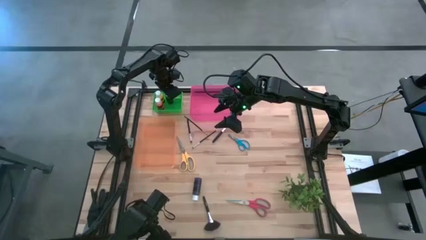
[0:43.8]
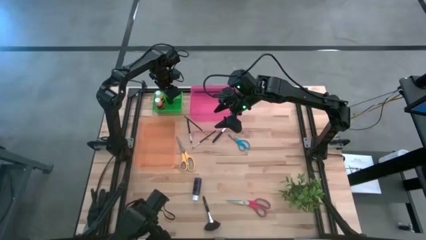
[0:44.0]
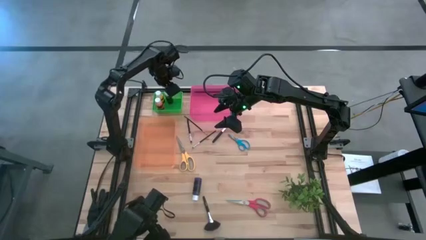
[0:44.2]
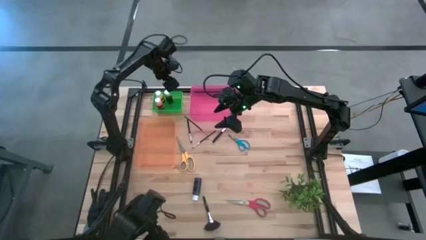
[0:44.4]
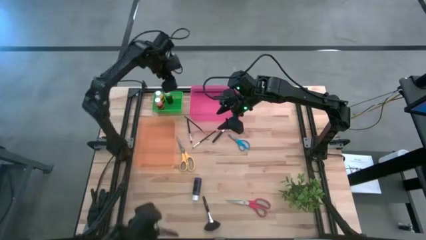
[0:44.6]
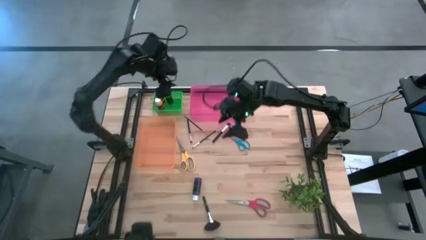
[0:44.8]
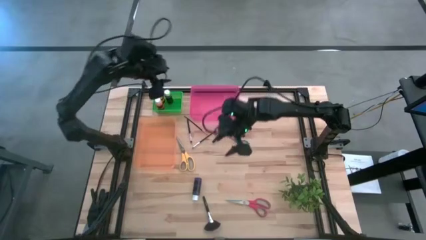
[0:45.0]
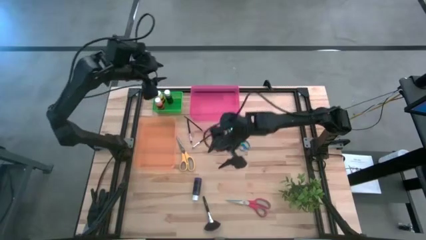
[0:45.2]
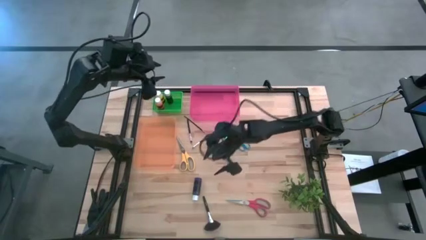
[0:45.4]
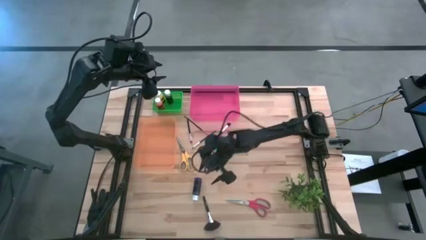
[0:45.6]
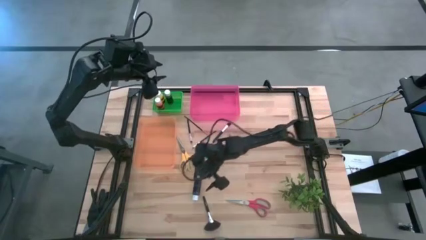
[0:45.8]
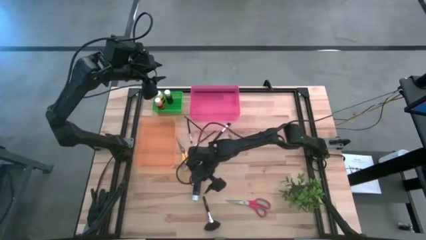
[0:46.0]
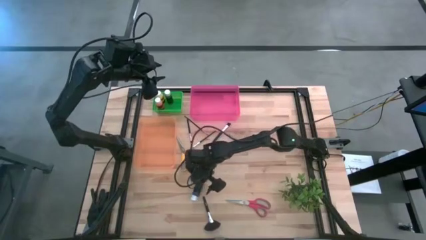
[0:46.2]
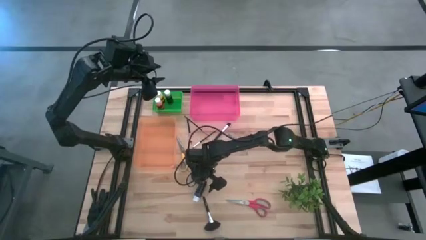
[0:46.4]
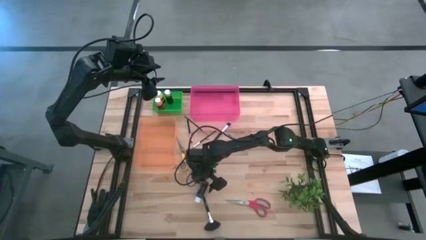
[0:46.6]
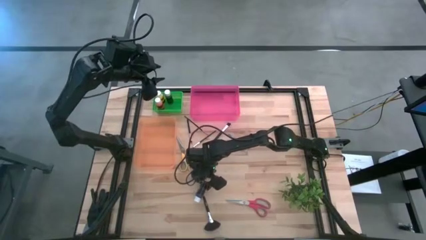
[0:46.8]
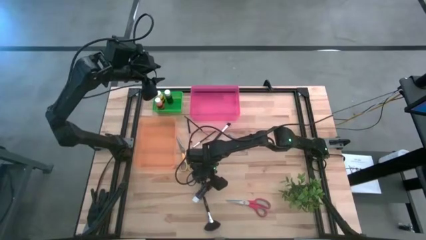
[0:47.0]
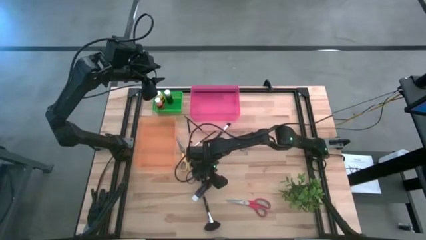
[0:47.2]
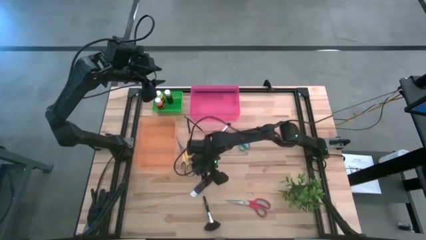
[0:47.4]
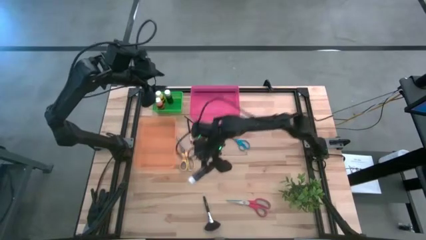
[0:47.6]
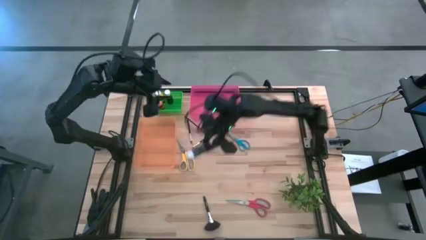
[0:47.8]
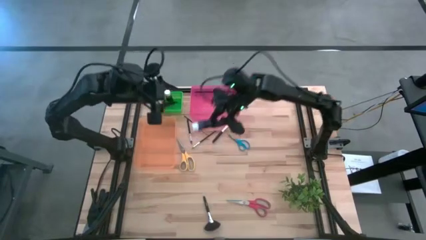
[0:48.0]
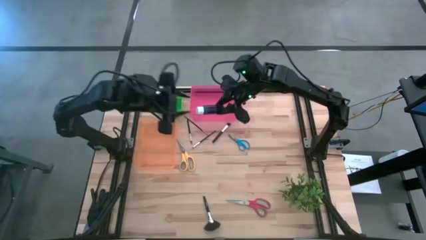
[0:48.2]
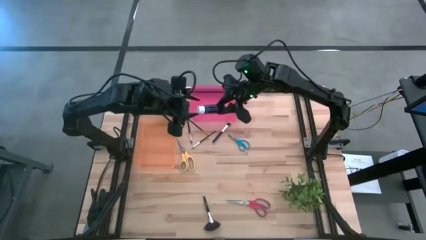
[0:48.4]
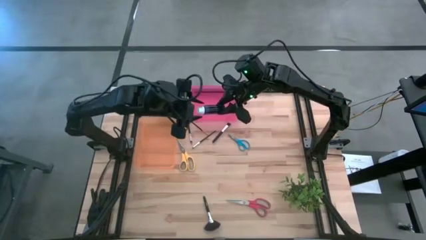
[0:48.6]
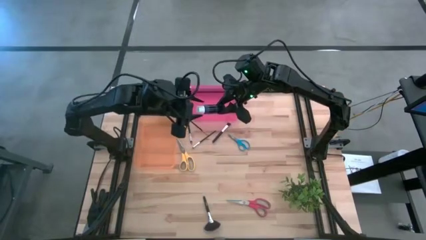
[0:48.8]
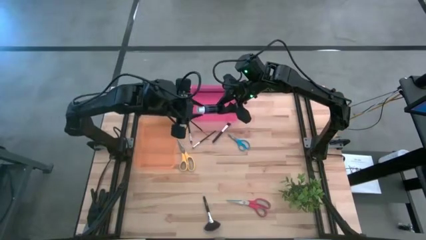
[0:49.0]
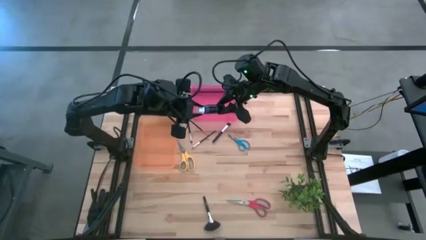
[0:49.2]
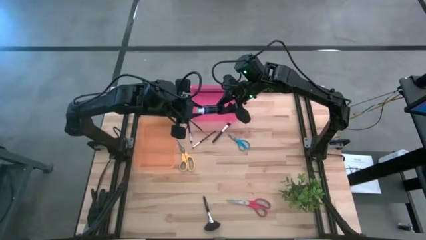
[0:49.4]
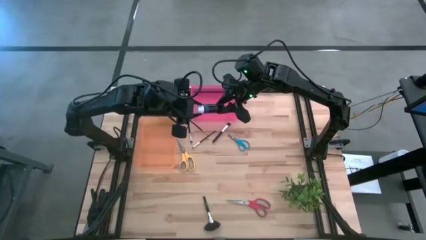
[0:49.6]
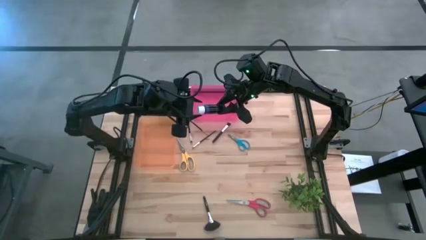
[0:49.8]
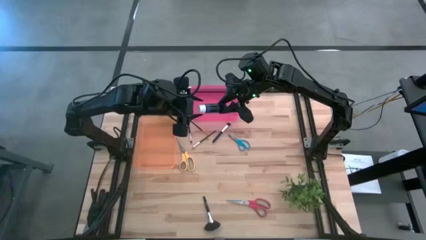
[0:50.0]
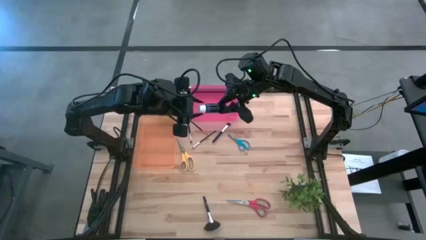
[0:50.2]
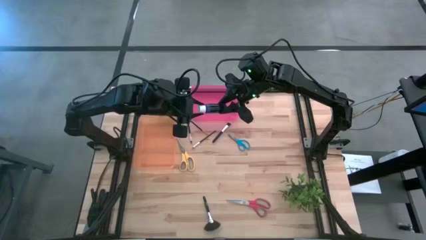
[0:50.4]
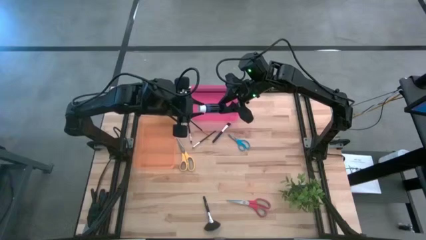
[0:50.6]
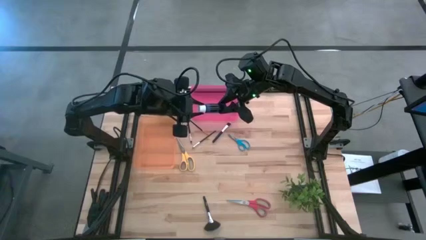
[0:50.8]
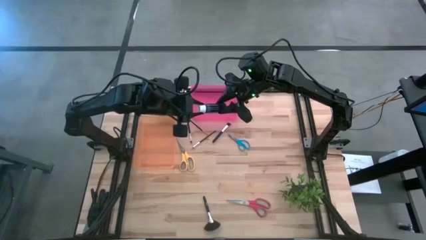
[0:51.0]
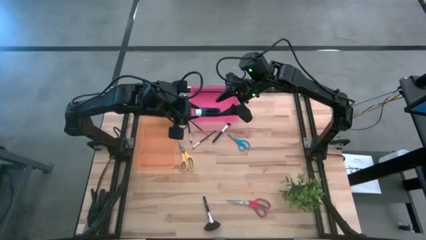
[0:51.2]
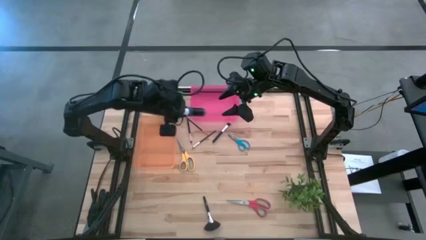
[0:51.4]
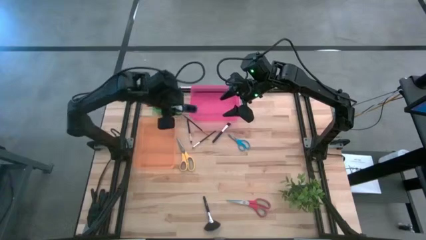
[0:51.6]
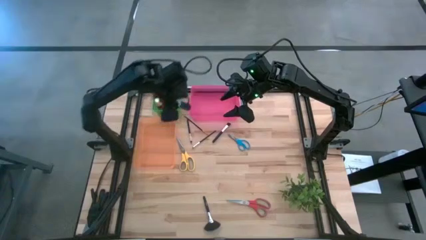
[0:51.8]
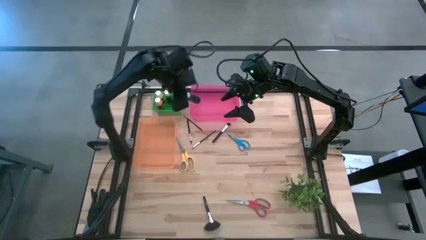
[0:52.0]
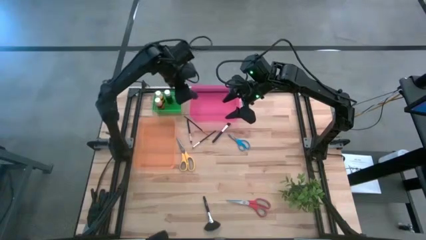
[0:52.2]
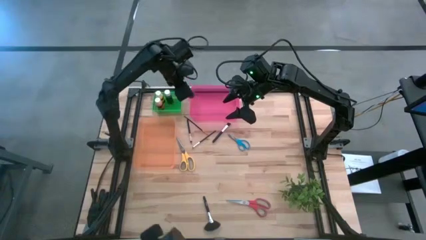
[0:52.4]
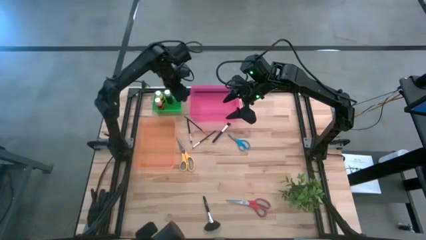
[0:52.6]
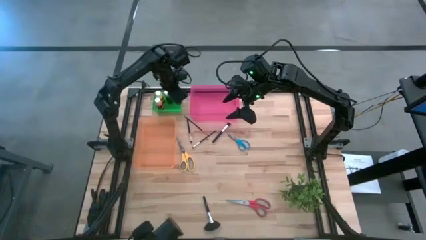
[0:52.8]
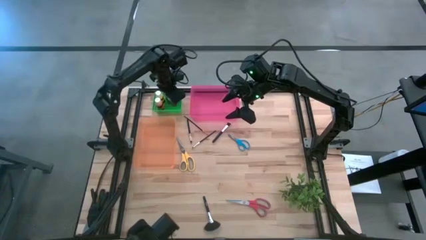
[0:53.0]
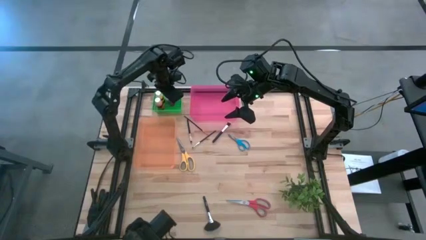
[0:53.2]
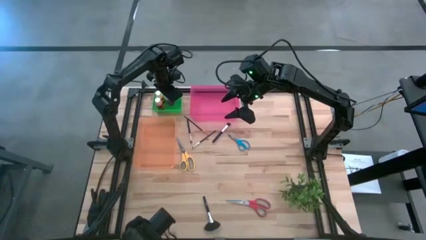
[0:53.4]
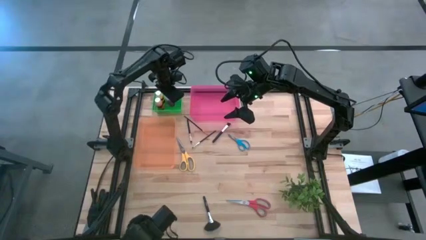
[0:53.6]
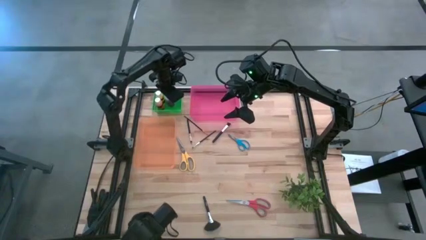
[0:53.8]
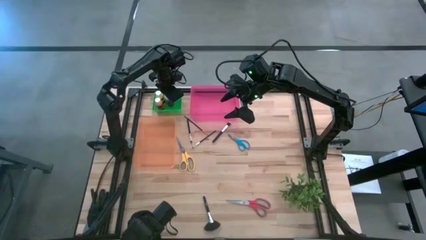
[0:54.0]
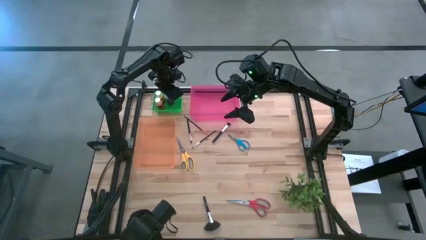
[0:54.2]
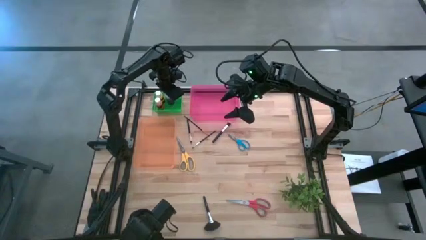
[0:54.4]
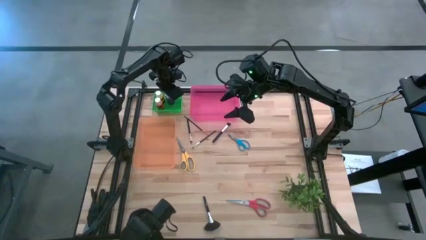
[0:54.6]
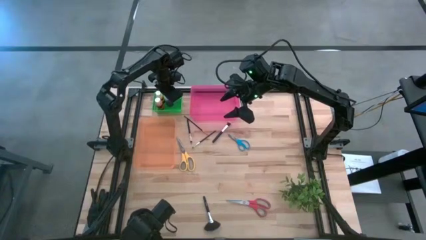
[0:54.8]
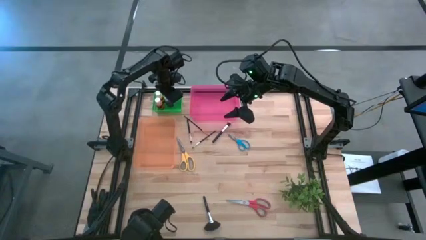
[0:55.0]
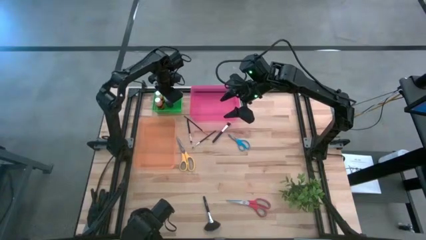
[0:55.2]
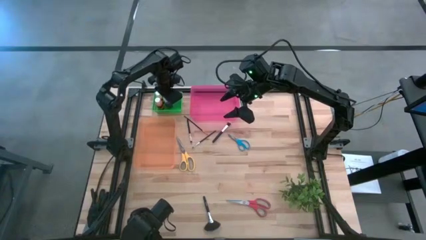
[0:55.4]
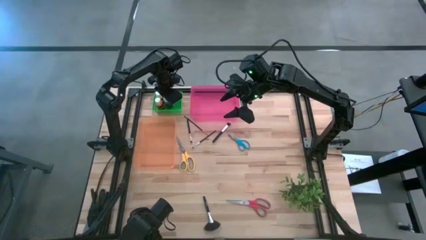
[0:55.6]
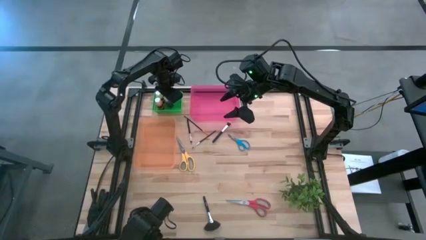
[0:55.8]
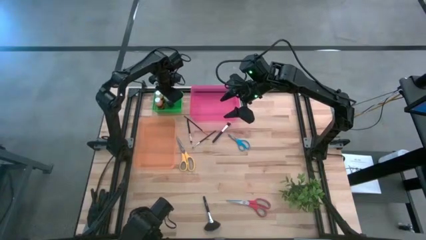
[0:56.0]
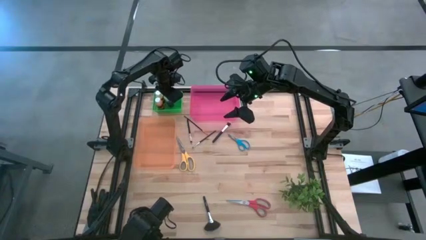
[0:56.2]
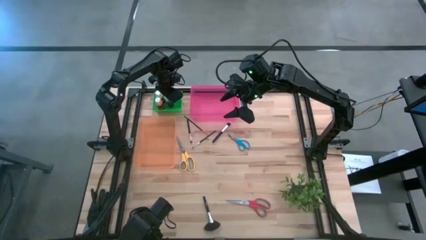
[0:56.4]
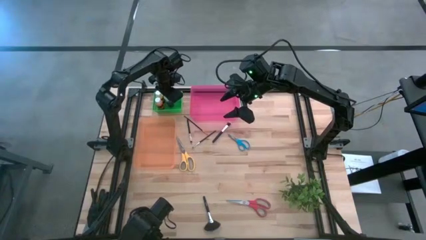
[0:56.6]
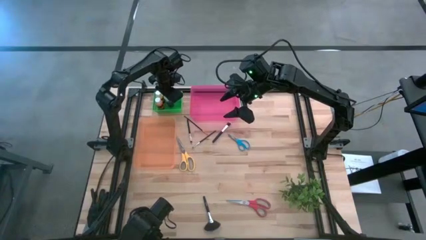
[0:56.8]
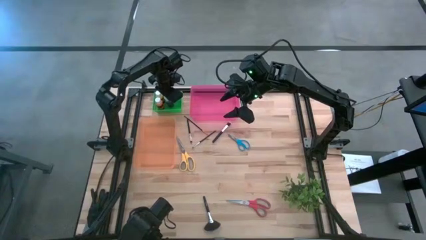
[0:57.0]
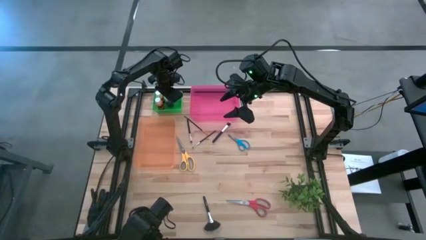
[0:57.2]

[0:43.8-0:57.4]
Task: Pick & Place Paint Supplies
Put the blue paint bottle into the green bin
